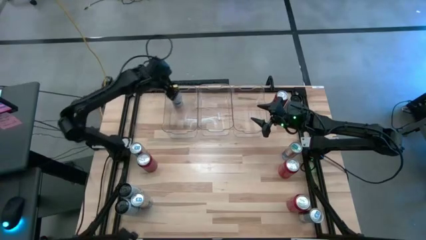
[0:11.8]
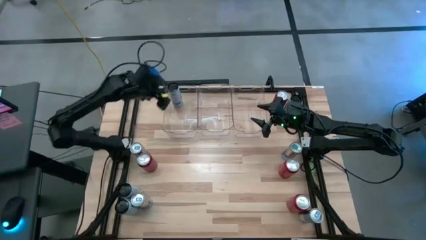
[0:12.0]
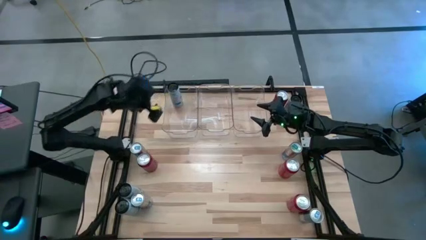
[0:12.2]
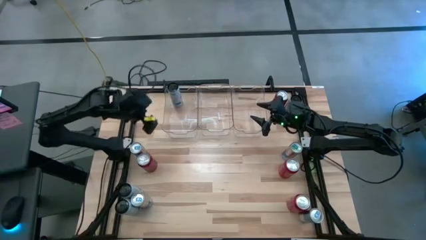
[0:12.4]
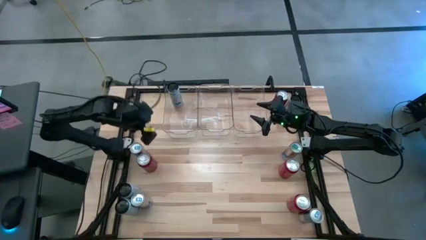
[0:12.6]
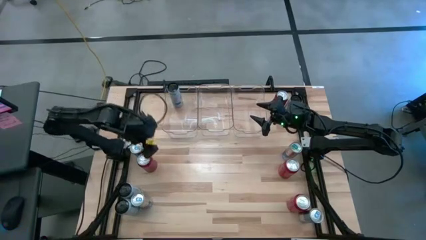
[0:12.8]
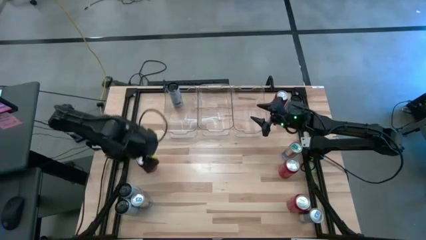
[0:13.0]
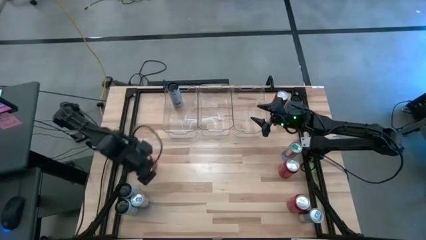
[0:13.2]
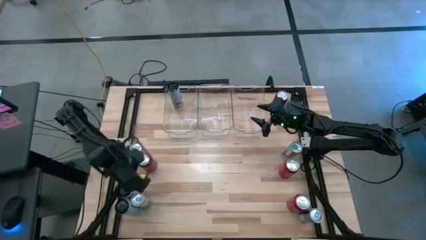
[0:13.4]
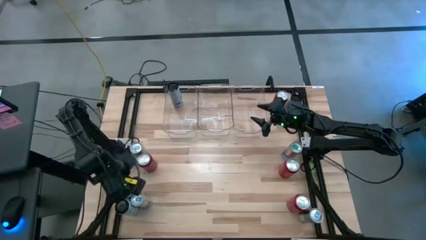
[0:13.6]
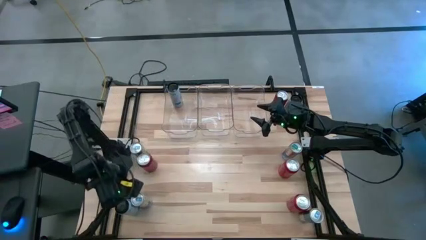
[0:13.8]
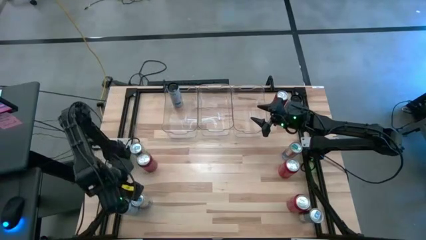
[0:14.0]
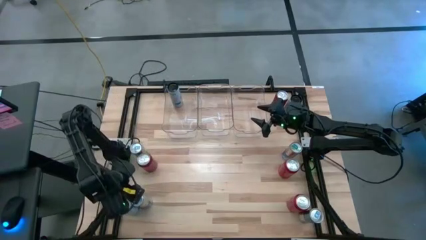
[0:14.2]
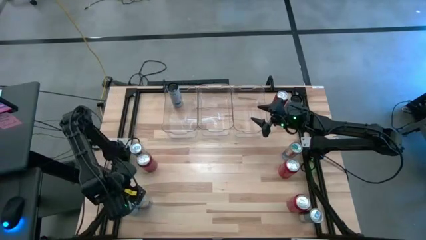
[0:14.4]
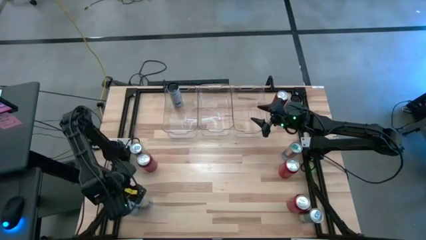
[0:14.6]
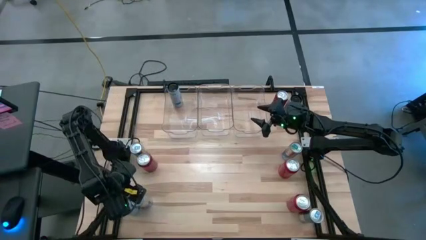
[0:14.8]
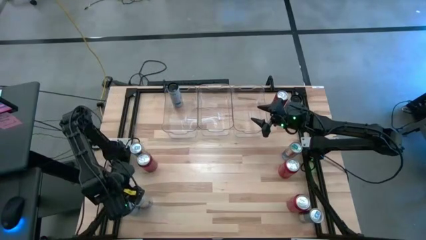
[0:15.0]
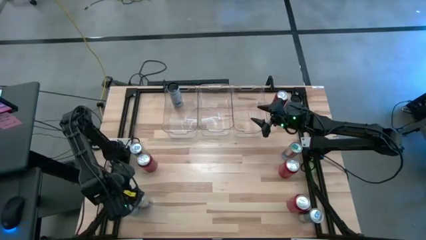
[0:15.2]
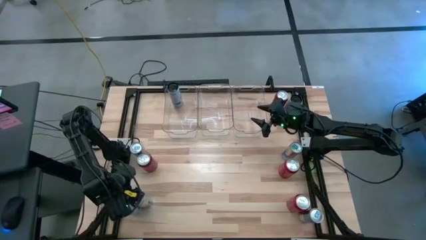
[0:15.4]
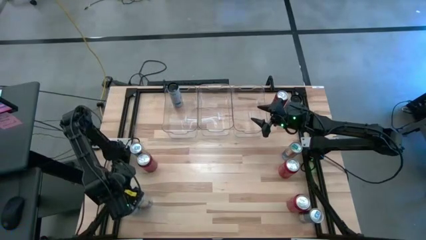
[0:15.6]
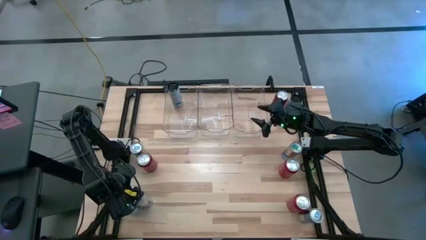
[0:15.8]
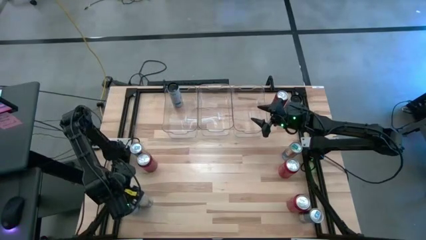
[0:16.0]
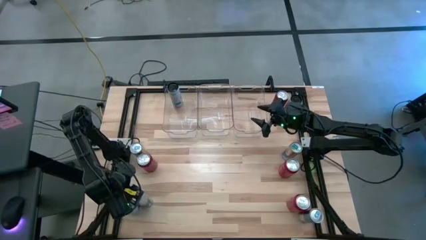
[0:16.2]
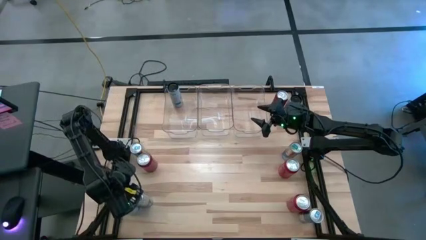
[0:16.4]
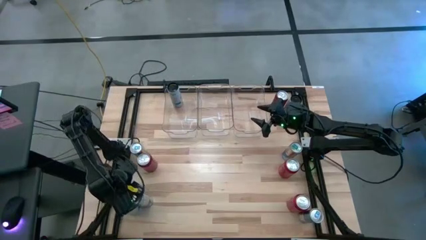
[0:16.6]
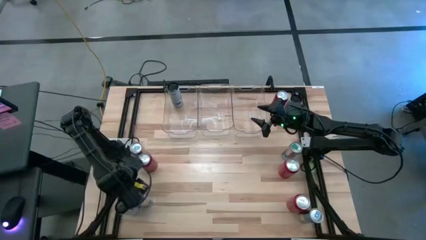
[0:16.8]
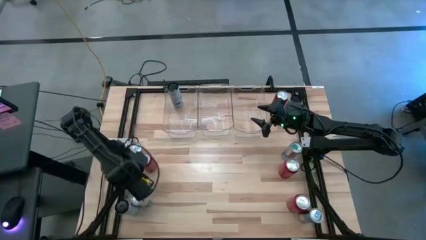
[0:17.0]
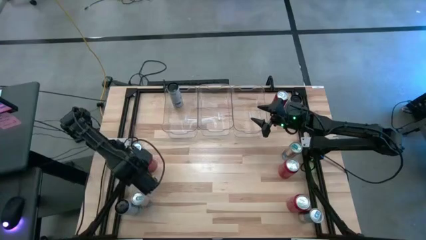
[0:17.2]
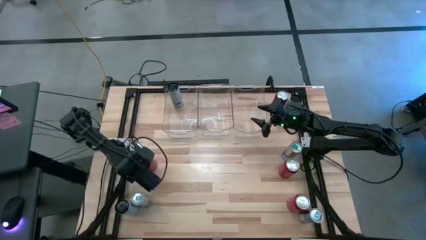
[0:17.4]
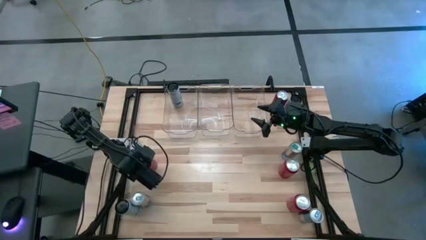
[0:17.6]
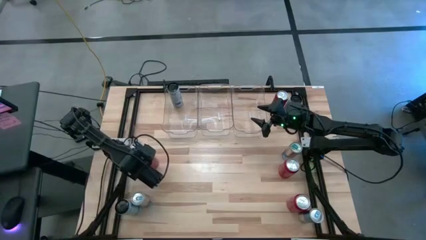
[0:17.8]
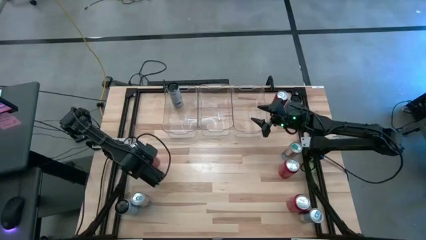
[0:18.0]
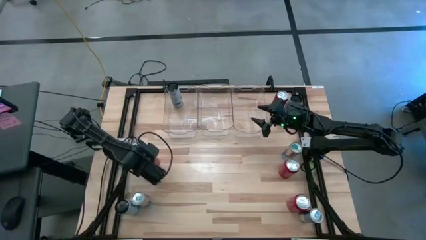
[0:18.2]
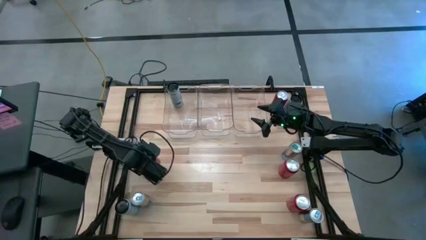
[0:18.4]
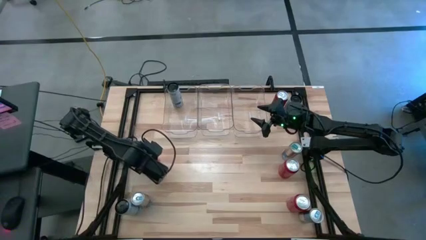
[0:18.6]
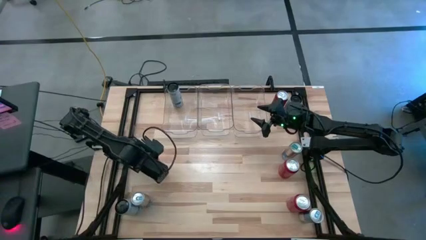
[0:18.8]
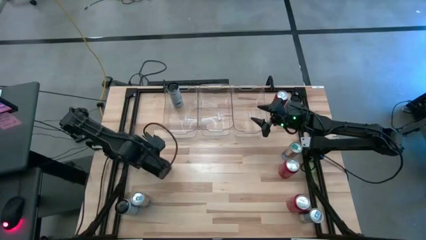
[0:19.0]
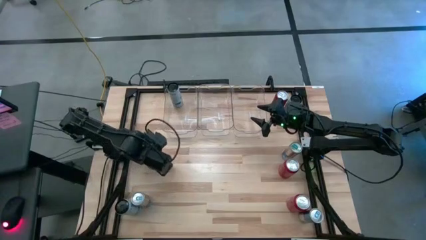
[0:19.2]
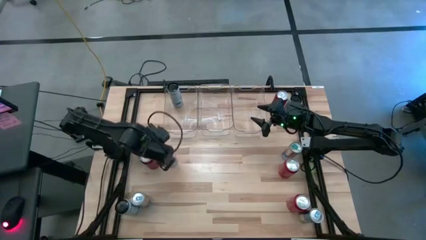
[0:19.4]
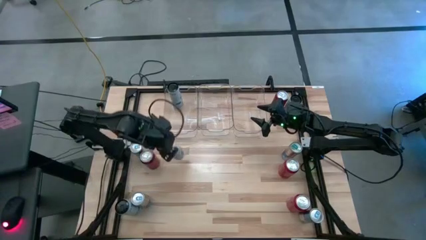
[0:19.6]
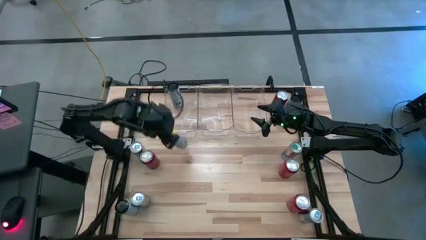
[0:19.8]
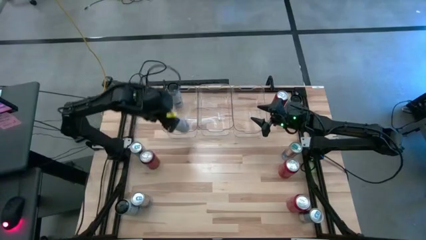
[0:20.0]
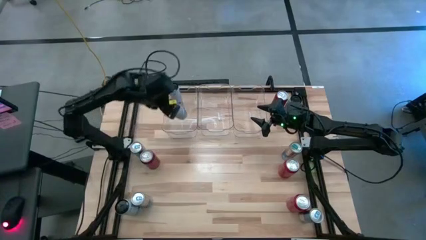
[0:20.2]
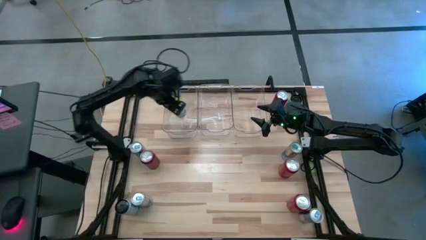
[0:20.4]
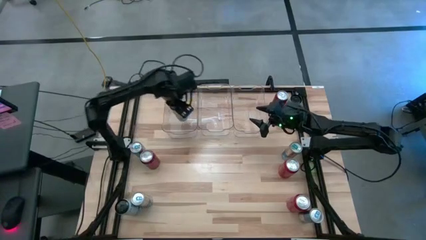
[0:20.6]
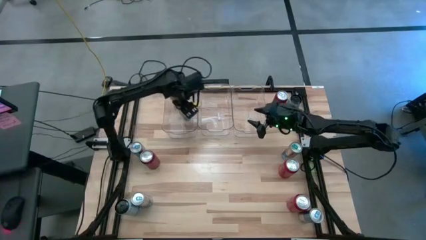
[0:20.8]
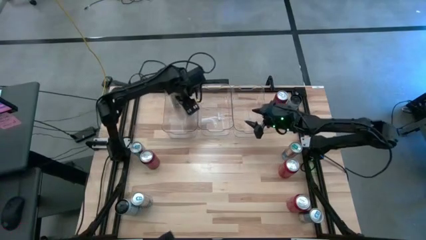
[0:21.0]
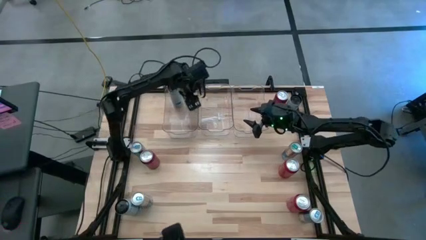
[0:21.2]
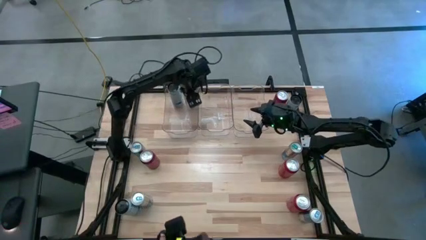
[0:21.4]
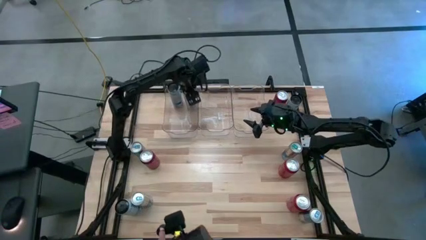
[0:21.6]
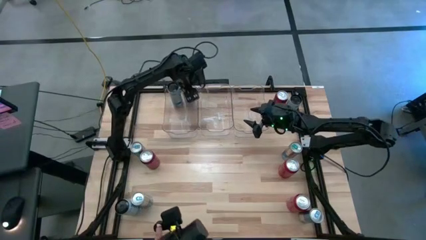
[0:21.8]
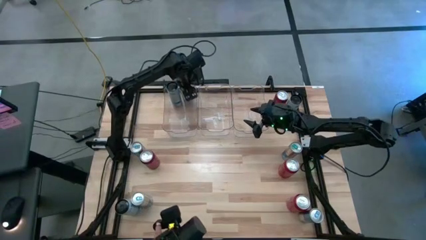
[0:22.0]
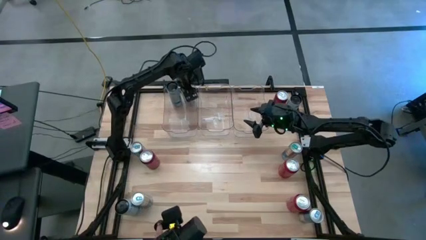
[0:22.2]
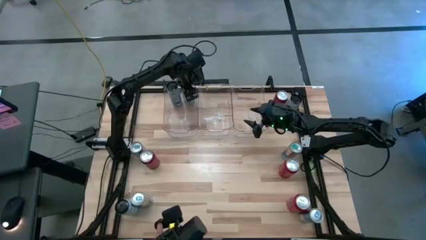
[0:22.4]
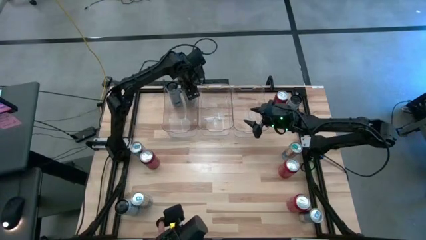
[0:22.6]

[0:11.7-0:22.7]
Task: Sort soda cans
Put the white-blue soda can into the left transparent bin
